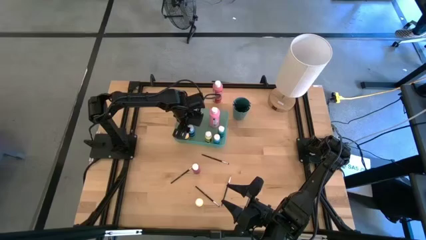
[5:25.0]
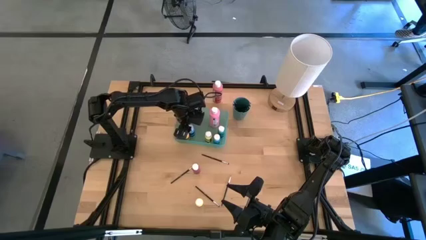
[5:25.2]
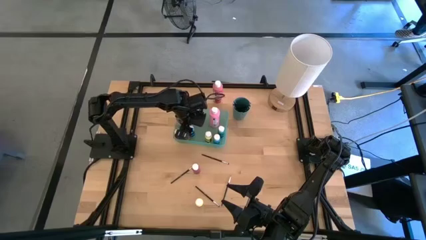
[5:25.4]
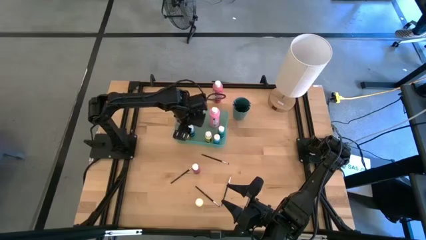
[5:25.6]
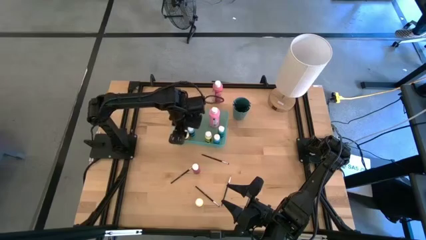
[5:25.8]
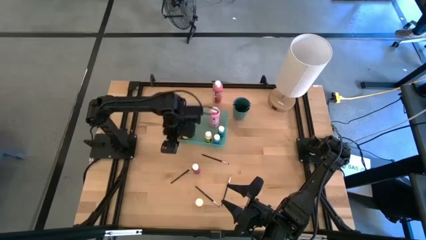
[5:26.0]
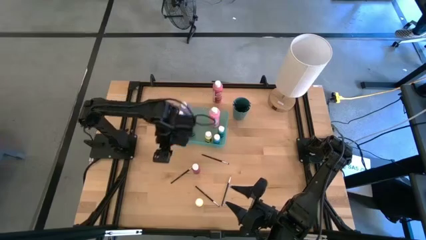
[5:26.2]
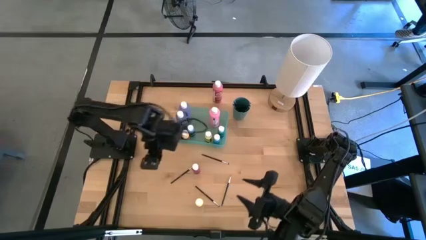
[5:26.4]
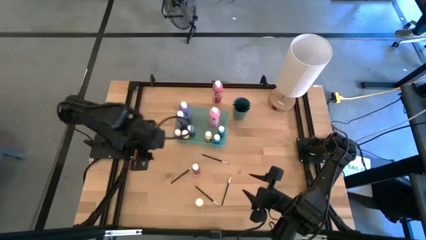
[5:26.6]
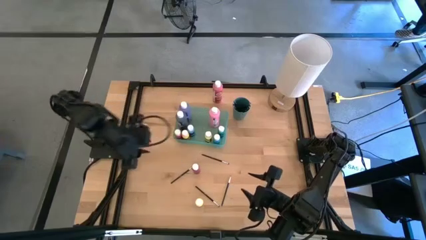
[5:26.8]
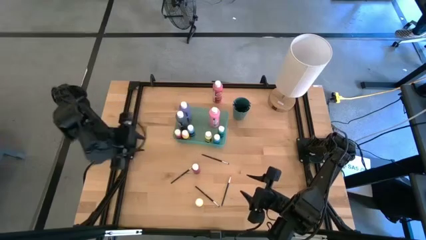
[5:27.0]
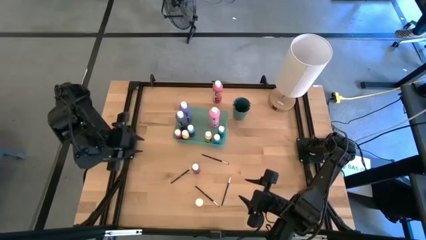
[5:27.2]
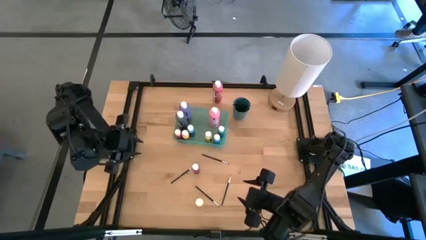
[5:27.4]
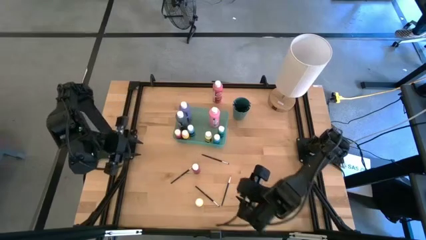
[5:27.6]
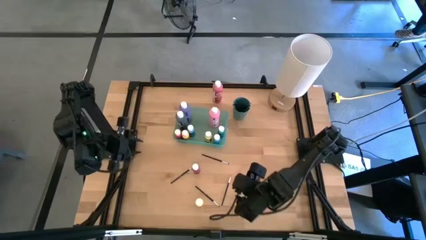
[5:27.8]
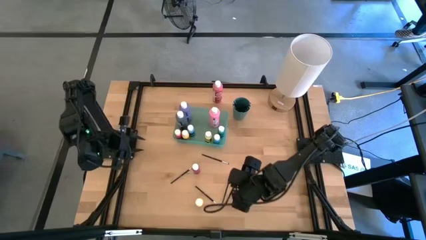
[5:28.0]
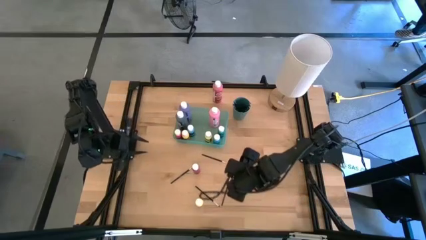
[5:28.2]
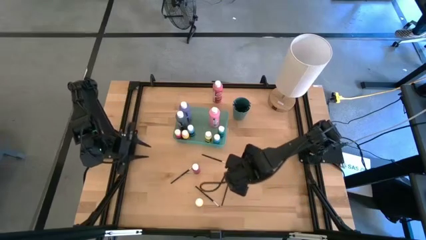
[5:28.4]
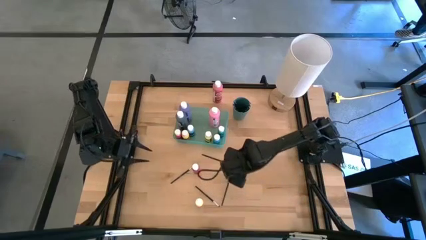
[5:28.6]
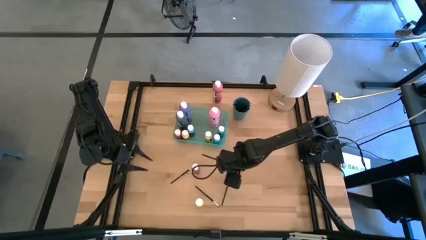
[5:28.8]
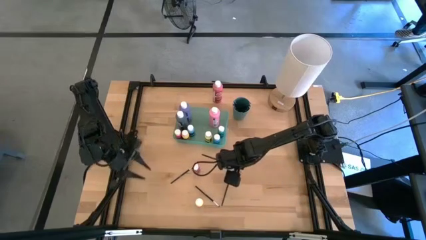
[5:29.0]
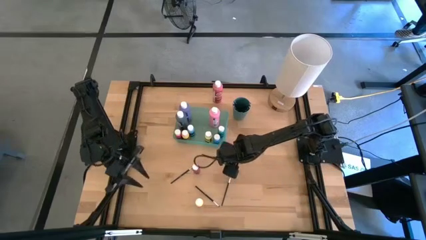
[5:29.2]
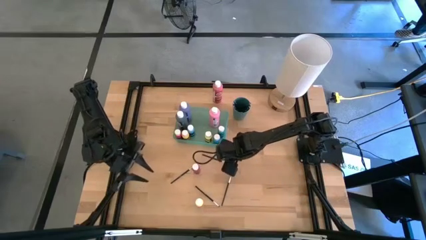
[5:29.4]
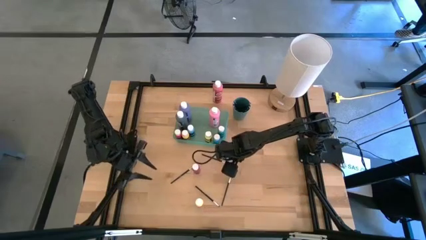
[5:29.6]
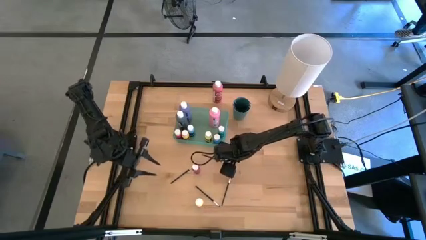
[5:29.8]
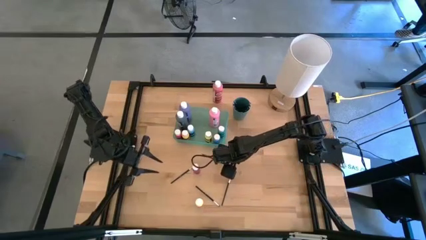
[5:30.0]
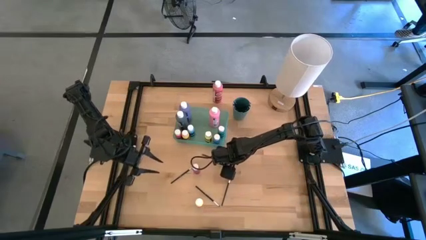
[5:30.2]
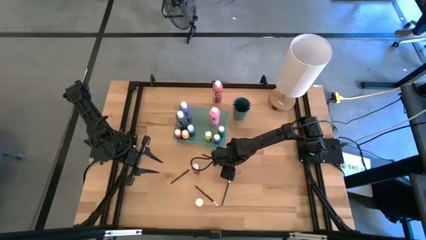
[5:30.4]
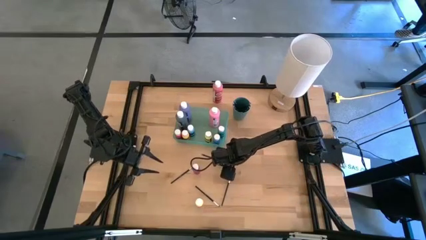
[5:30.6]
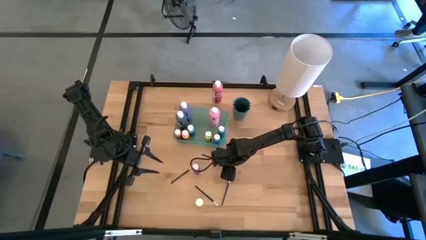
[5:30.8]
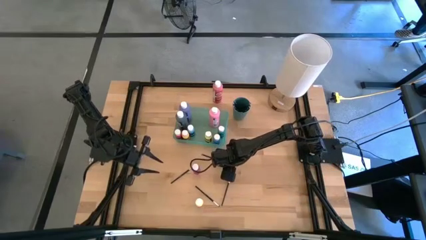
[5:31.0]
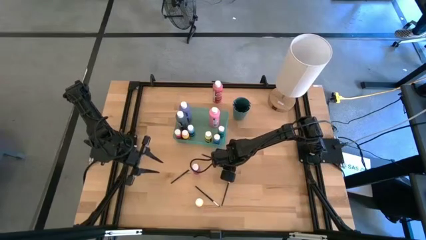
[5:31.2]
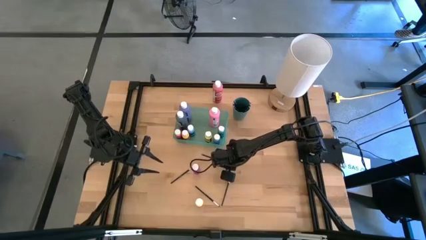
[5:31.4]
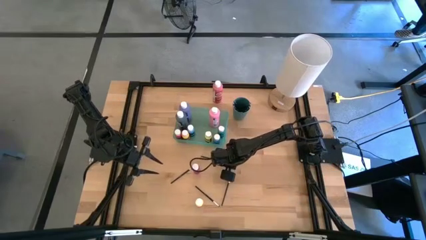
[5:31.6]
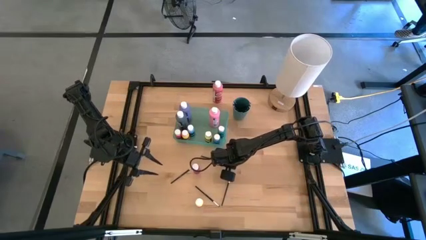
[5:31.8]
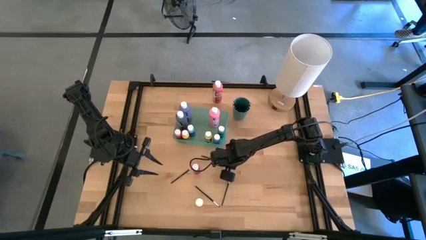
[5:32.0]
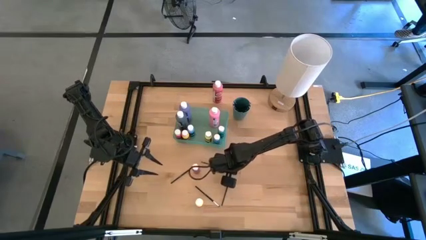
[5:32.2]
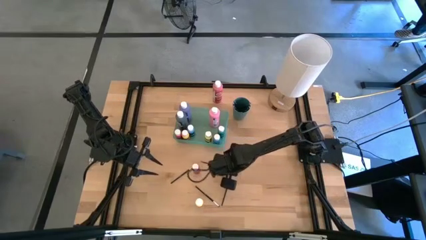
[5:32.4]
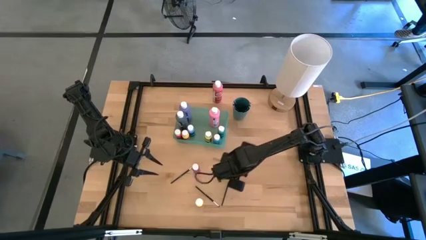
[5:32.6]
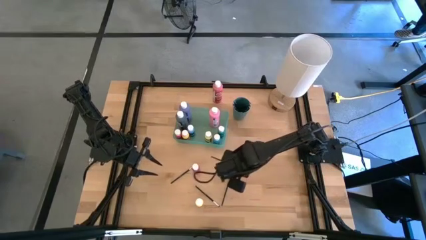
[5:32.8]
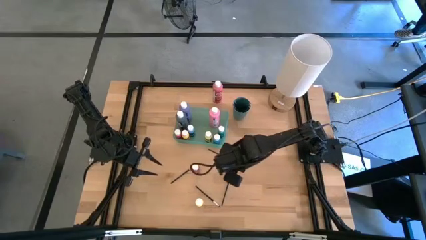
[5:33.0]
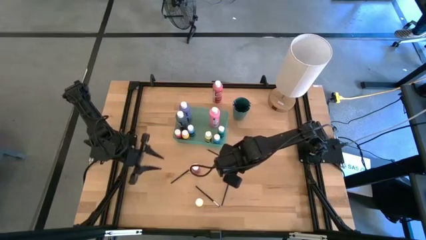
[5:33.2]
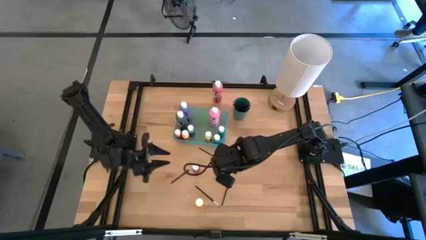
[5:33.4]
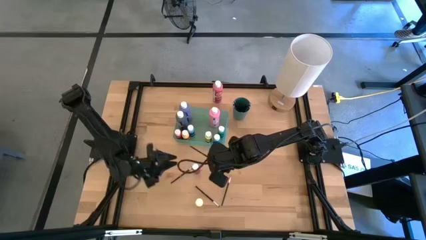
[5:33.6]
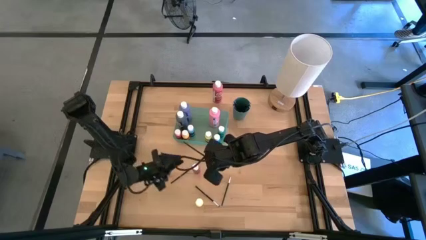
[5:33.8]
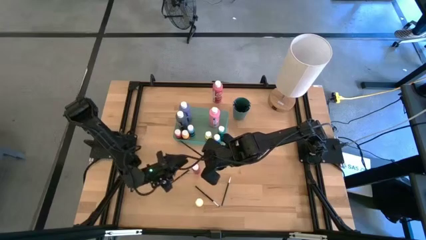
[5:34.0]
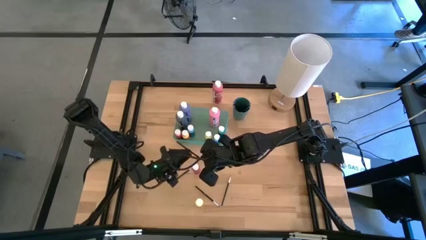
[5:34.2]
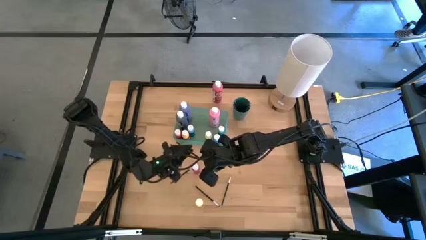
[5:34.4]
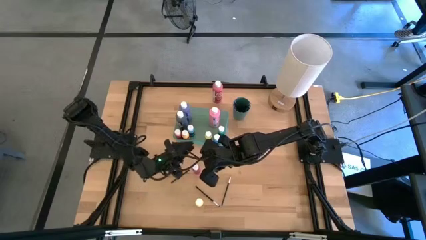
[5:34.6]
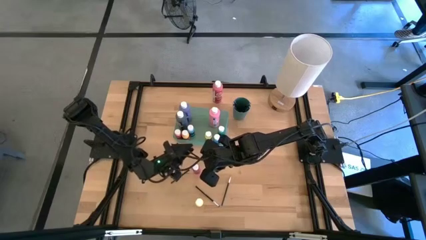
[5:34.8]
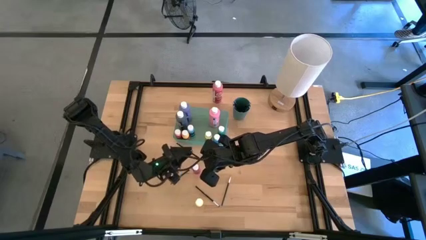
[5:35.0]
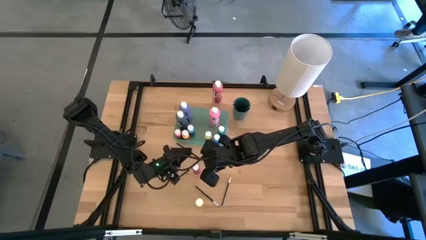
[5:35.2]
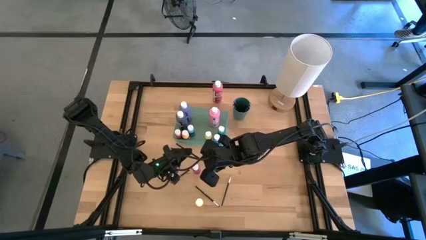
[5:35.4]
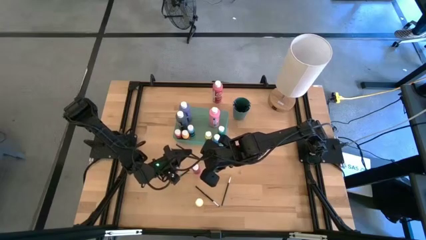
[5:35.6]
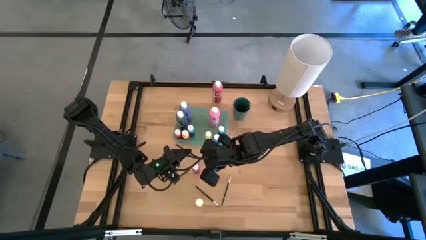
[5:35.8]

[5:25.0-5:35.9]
Task: Pick & Place Paint Supplies
Put the black paint brush into the dark green cup
